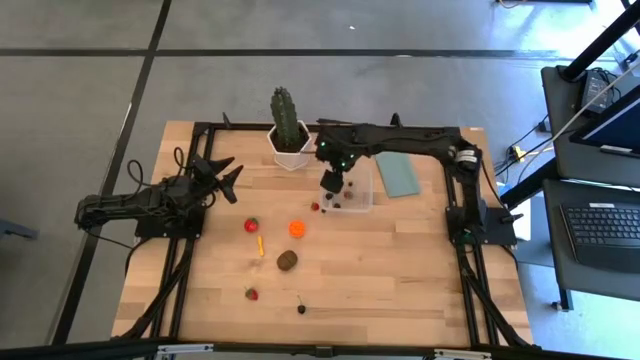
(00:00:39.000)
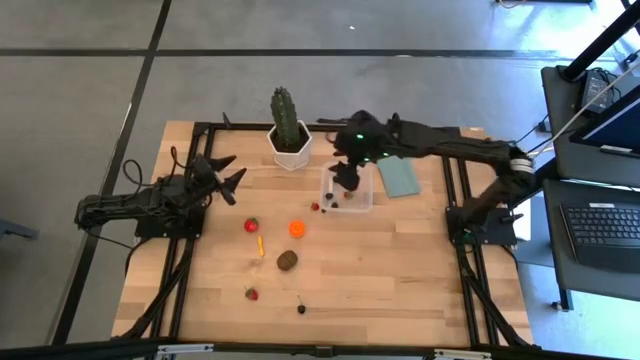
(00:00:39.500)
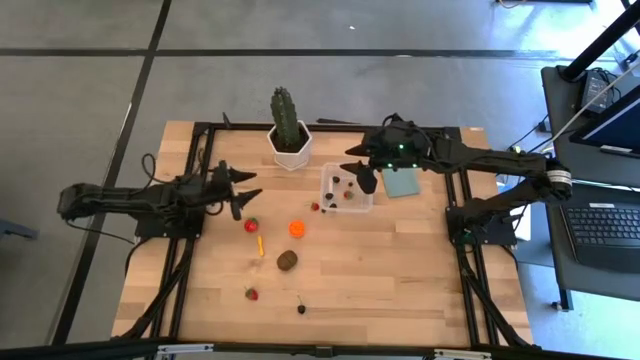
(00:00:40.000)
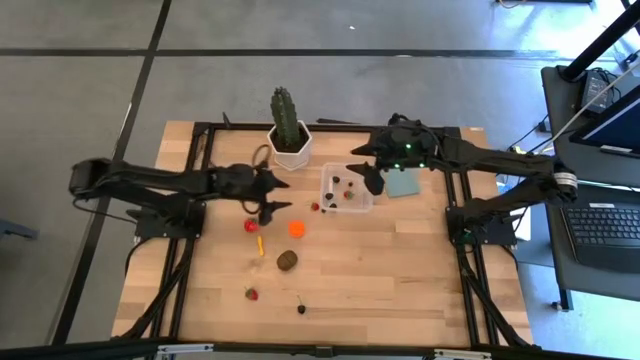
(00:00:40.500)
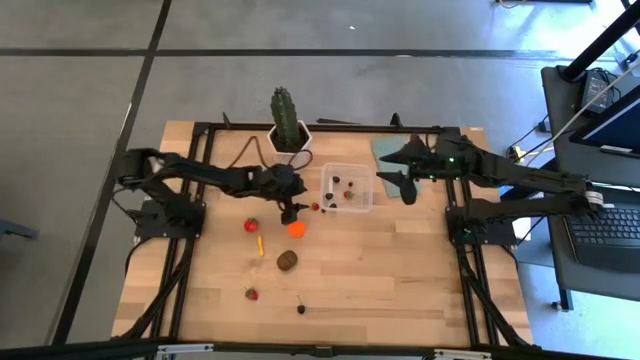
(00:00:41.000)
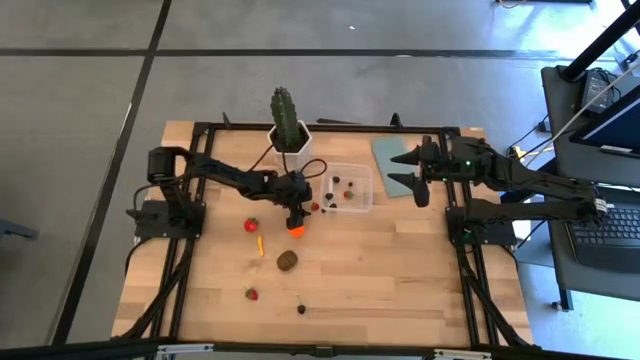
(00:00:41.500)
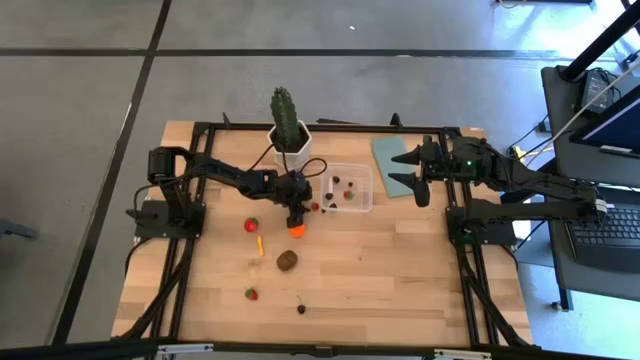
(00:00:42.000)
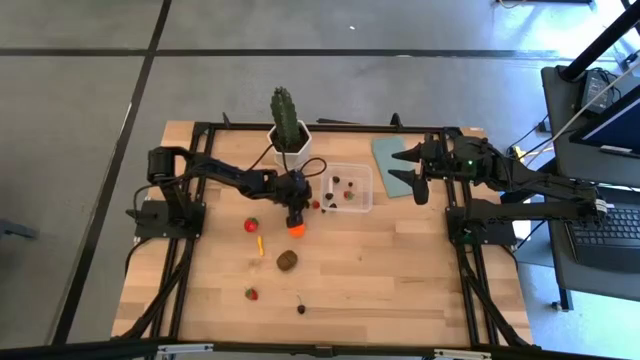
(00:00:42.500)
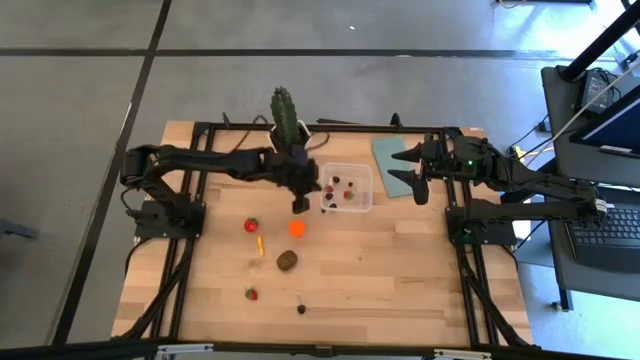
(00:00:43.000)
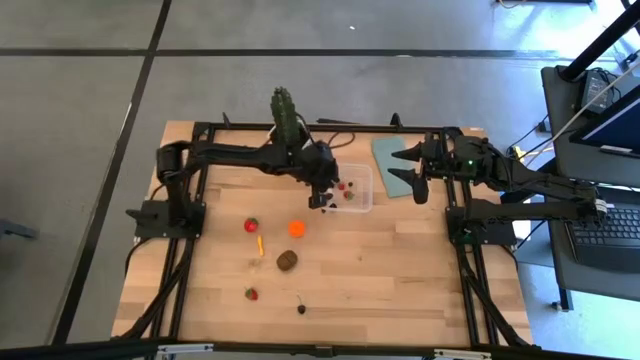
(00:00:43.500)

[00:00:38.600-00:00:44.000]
Task: Pick and placing Produce into tupperware
Put the top strawberry into the transparent bin

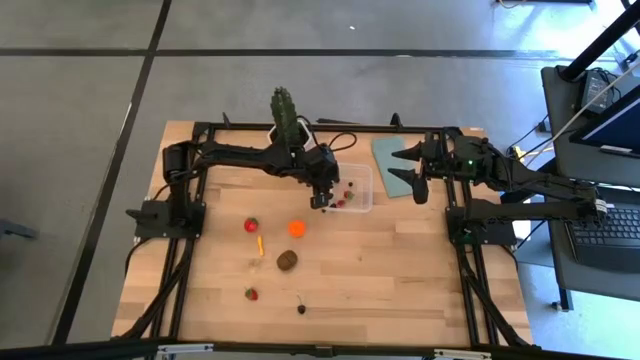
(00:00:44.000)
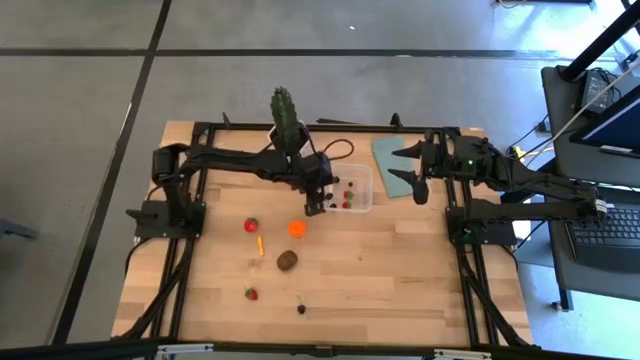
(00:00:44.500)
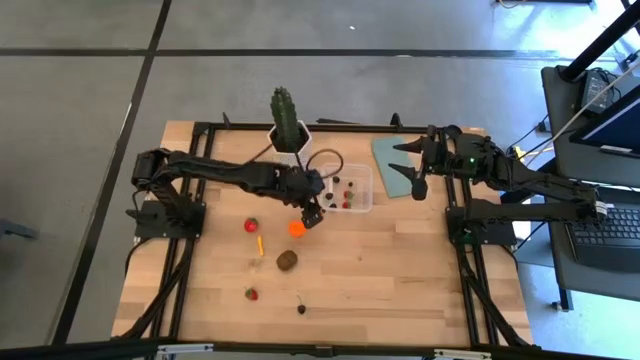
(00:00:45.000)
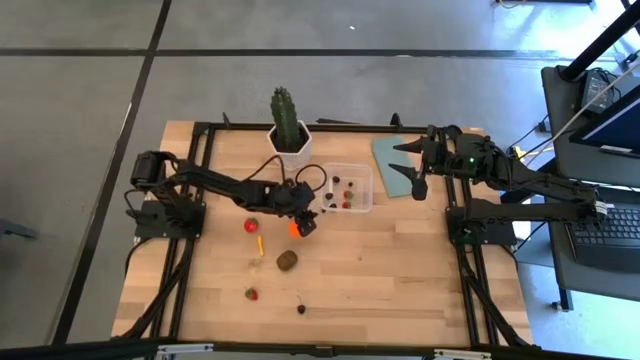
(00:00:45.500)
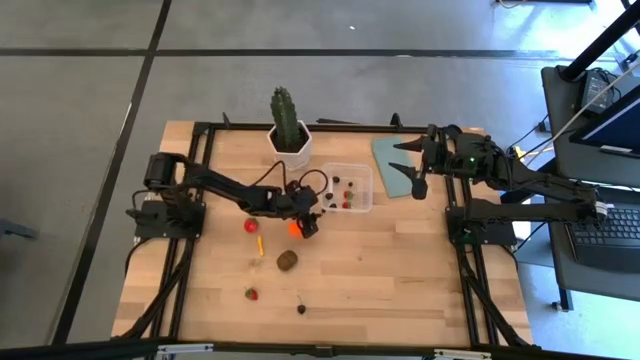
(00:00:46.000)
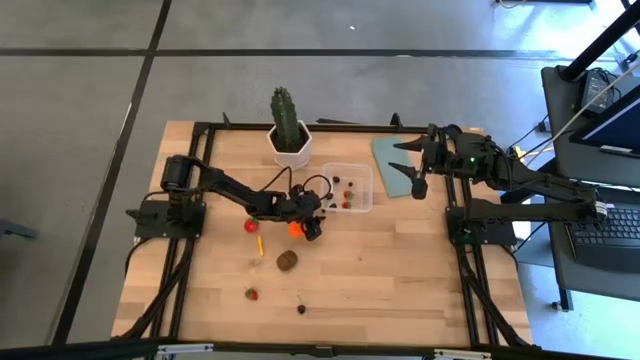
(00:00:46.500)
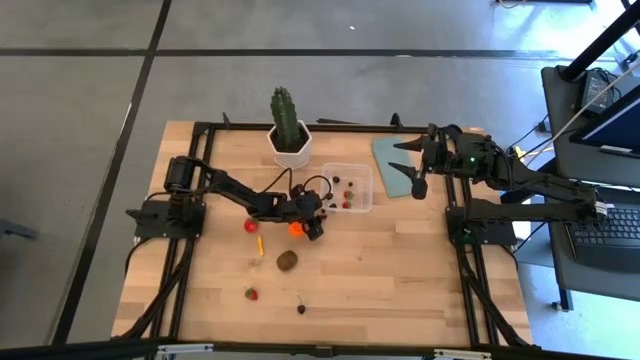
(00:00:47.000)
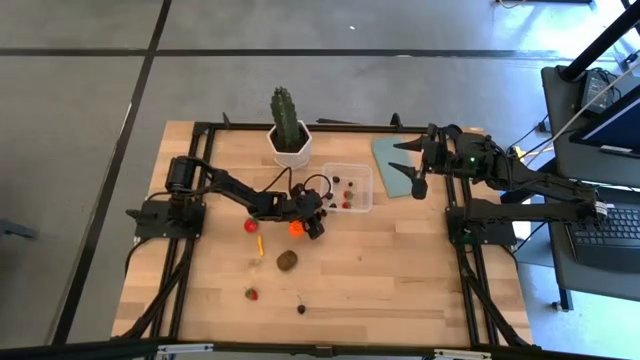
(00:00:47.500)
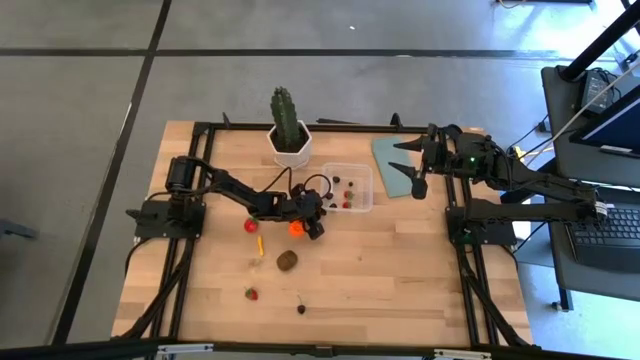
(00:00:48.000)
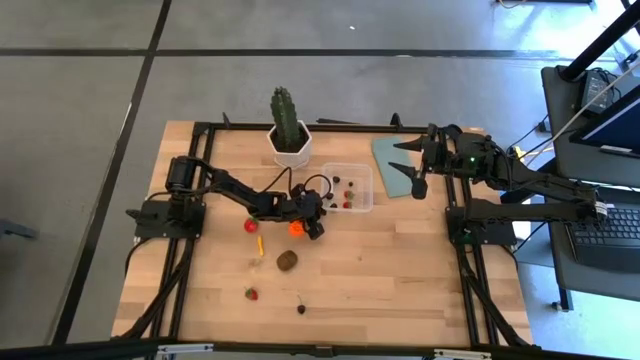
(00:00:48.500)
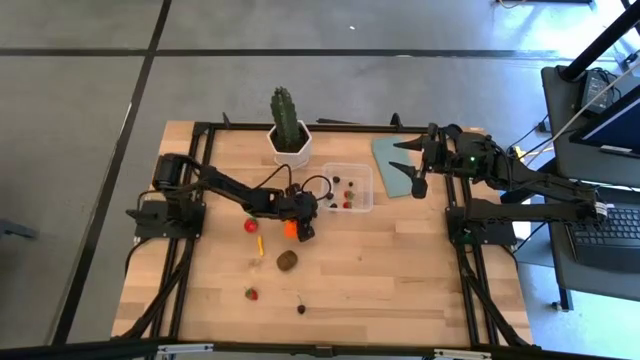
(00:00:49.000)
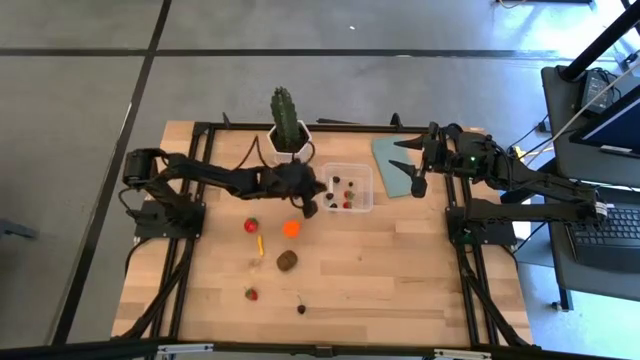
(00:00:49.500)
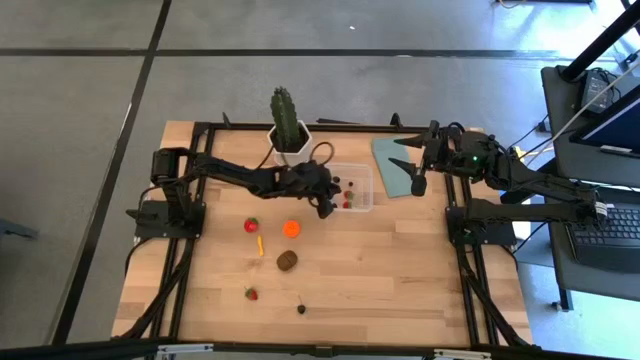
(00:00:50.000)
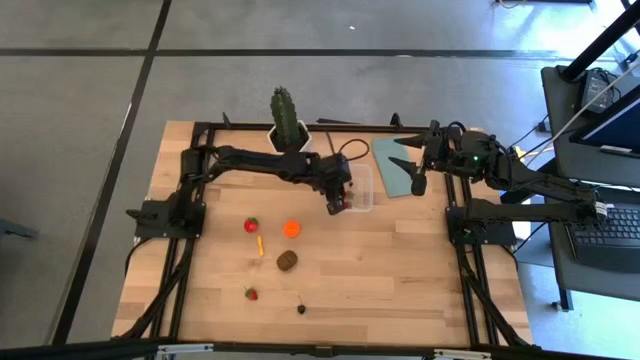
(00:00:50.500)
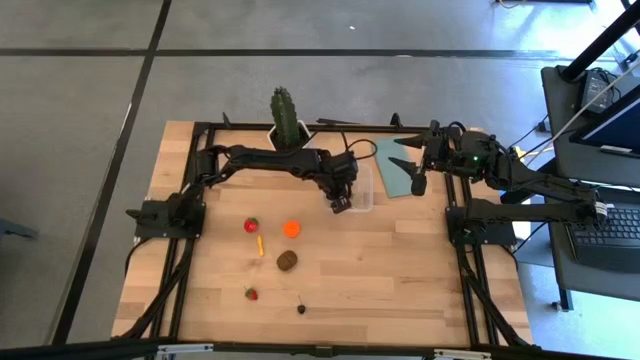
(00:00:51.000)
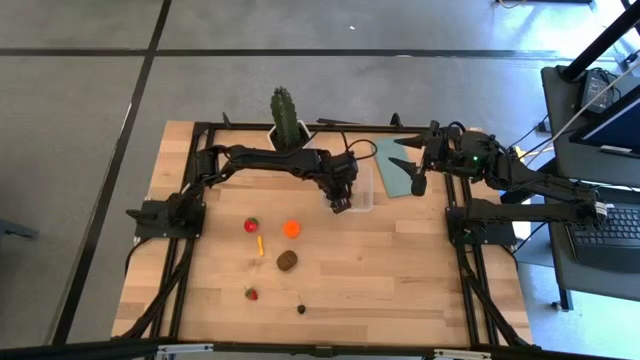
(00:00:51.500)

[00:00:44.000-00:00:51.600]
Put the blueberry into the transparent bin

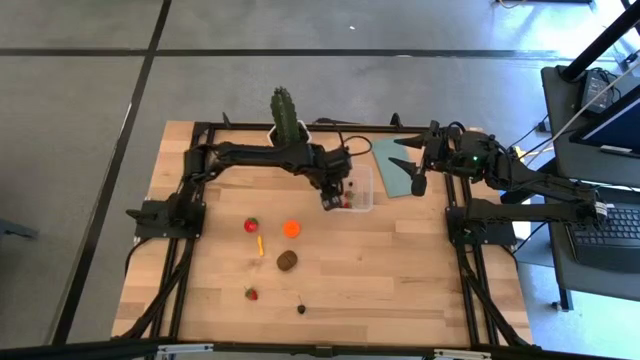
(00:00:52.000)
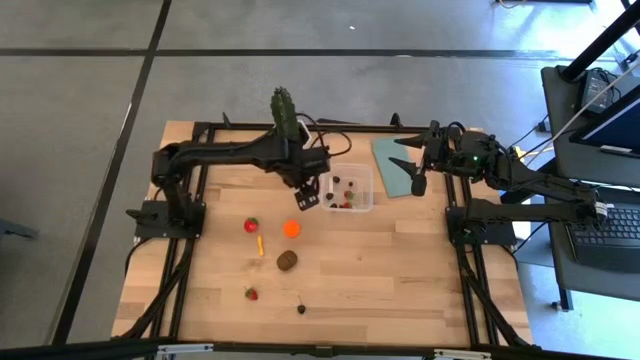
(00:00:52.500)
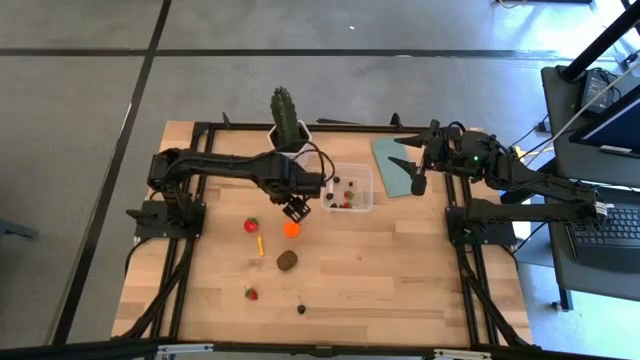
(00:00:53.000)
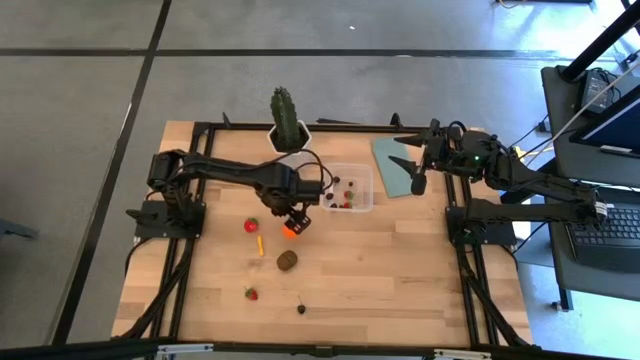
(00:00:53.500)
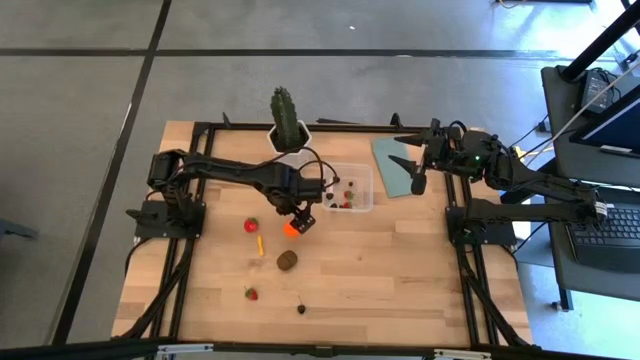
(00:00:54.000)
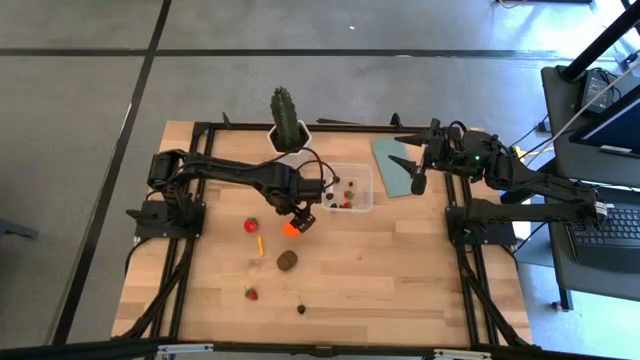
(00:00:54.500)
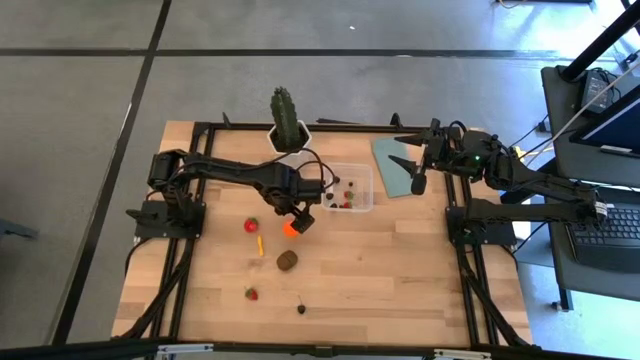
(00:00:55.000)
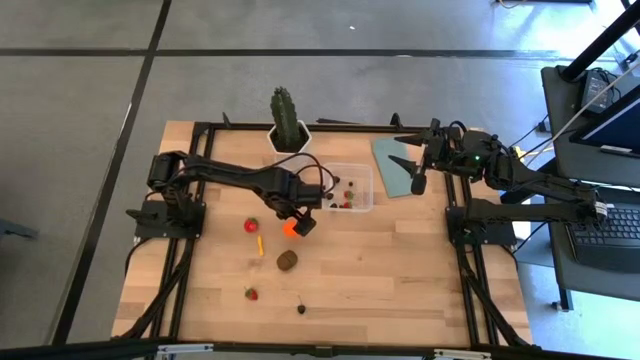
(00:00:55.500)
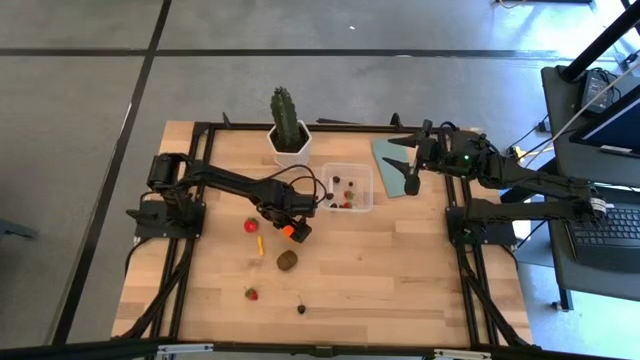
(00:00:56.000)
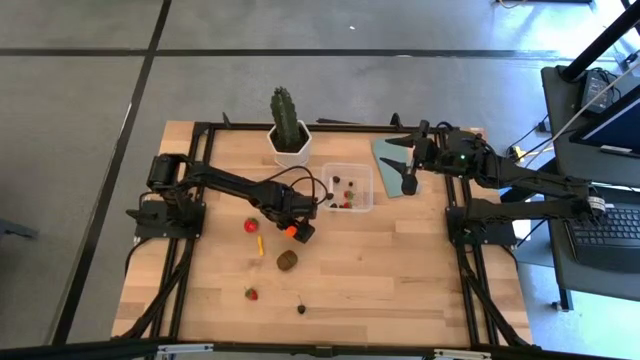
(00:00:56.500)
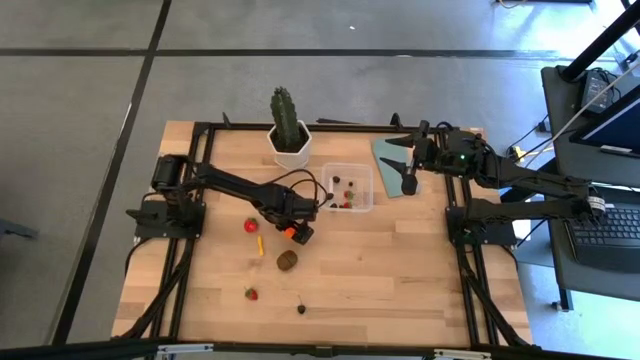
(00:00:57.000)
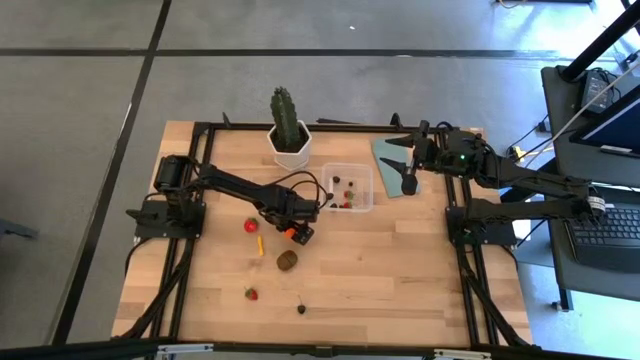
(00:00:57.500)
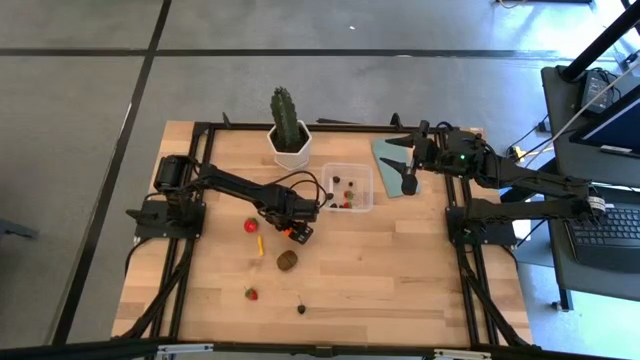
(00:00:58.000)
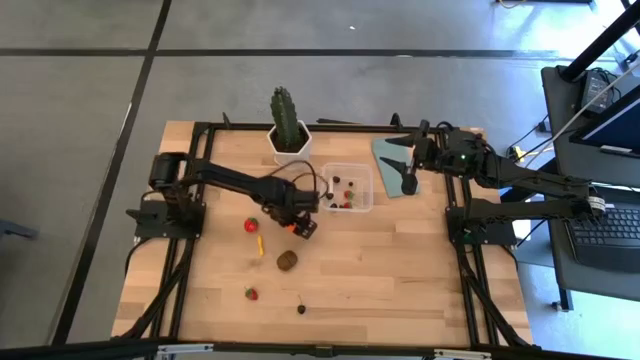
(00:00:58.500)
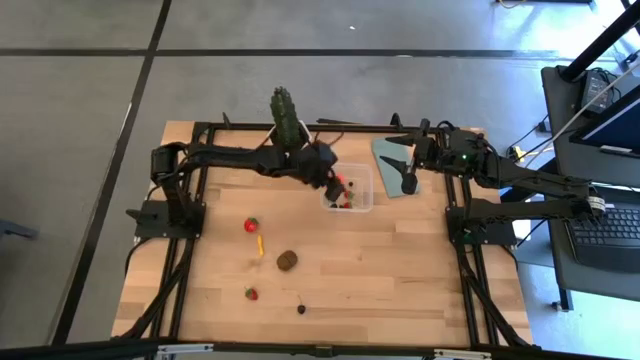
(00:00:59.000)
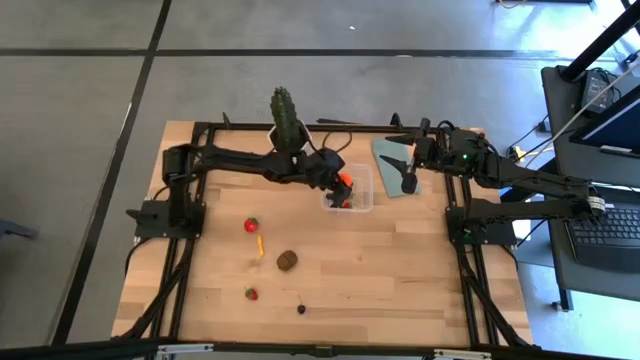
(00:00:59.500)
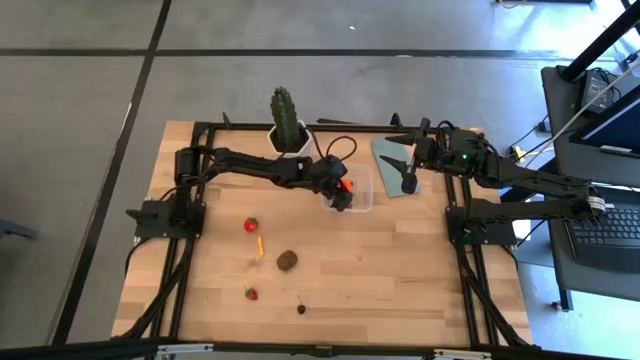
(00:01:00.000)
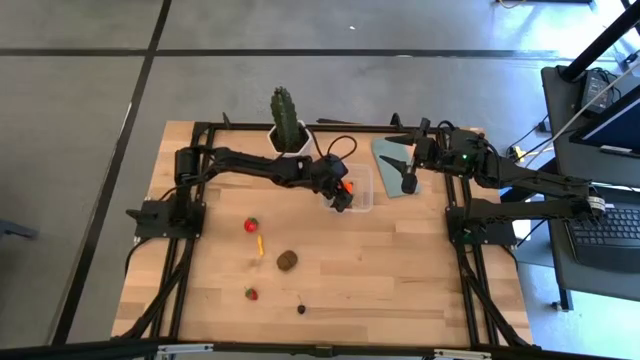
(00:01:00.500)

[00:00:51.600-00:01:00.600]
Put the pumpkin into the transparent bin
